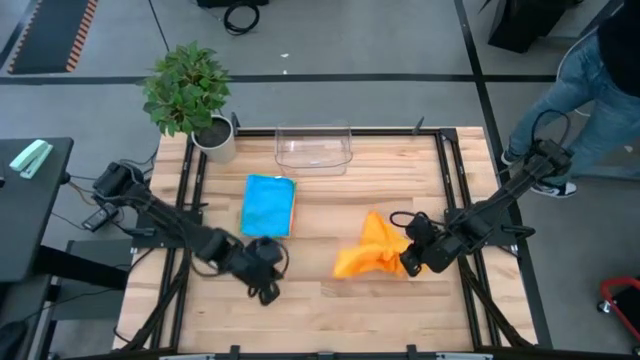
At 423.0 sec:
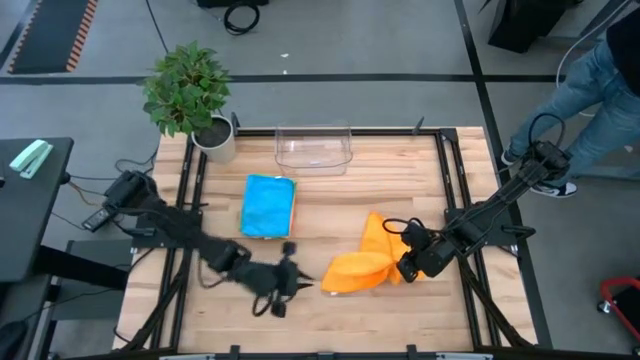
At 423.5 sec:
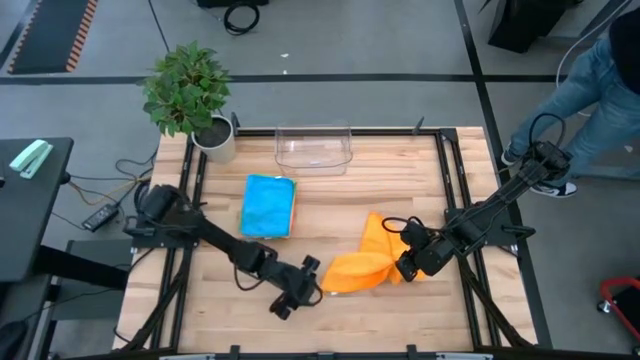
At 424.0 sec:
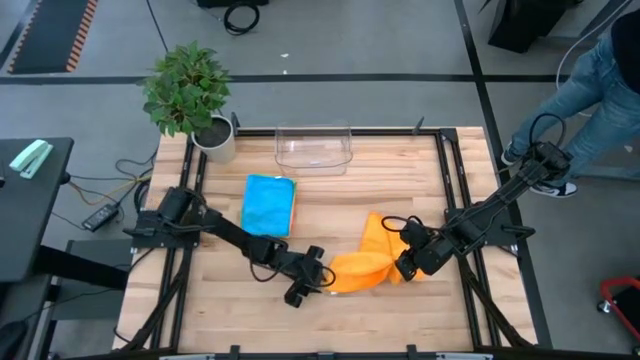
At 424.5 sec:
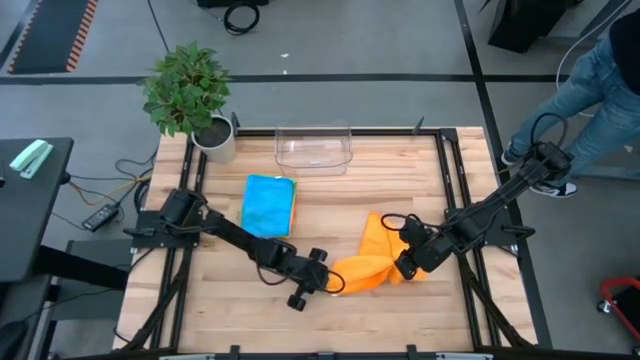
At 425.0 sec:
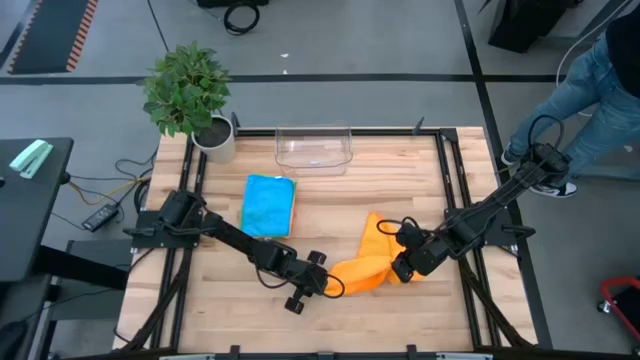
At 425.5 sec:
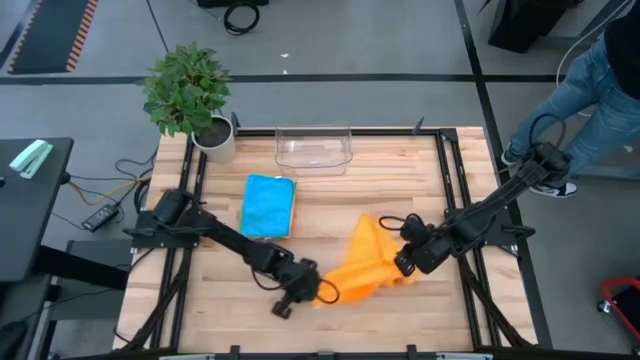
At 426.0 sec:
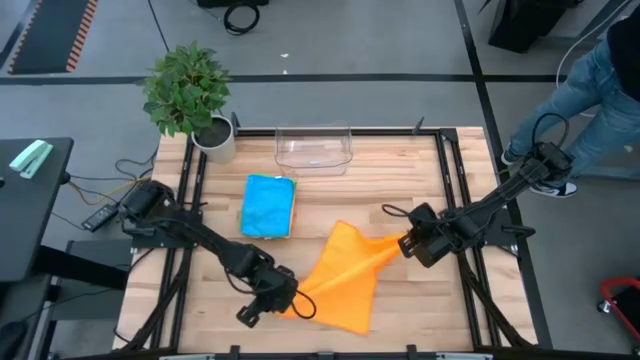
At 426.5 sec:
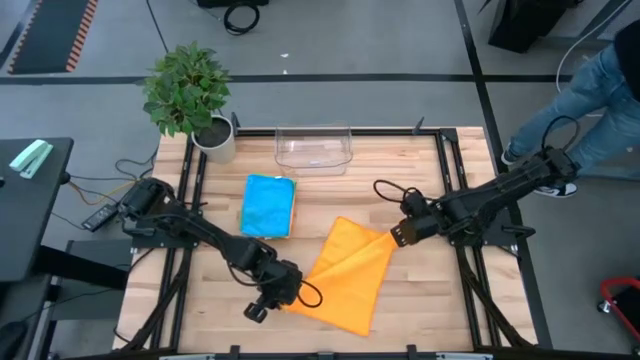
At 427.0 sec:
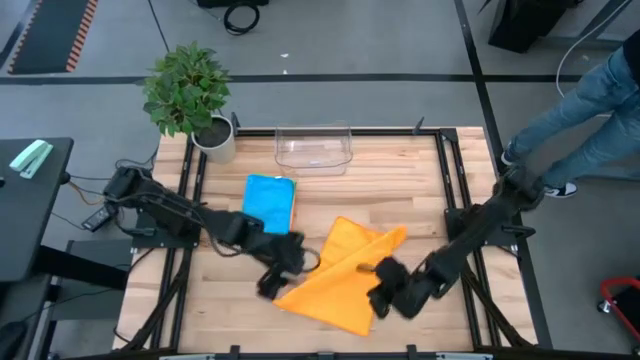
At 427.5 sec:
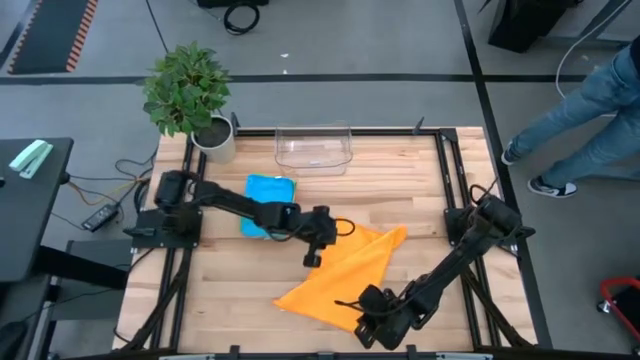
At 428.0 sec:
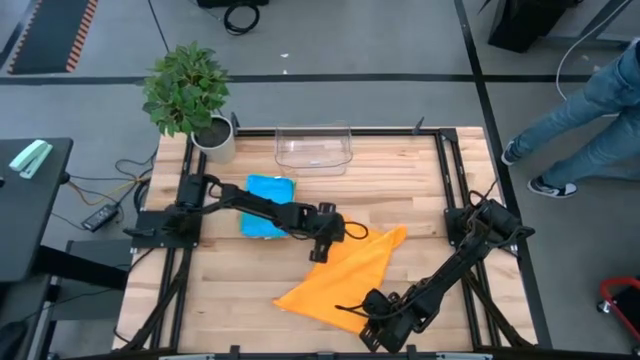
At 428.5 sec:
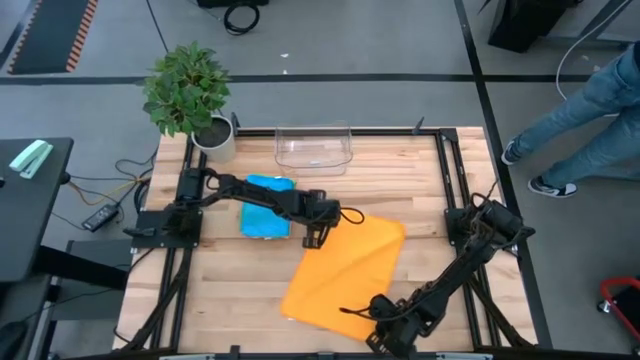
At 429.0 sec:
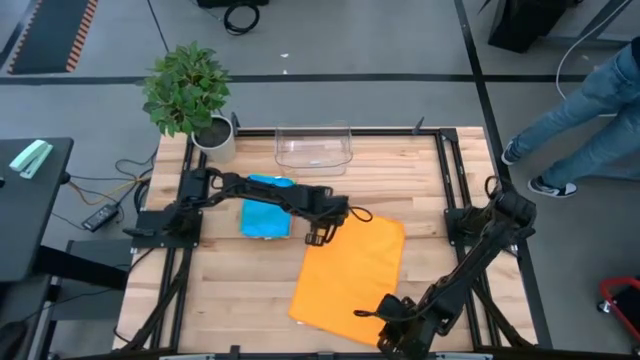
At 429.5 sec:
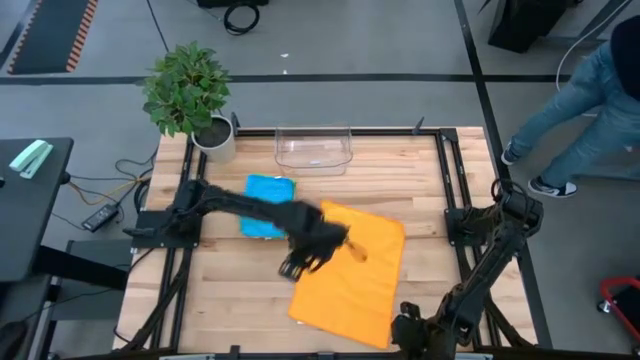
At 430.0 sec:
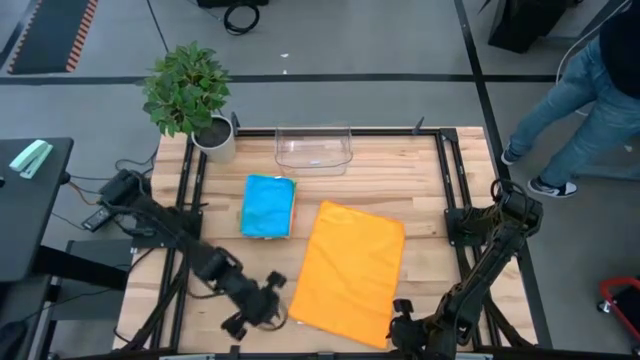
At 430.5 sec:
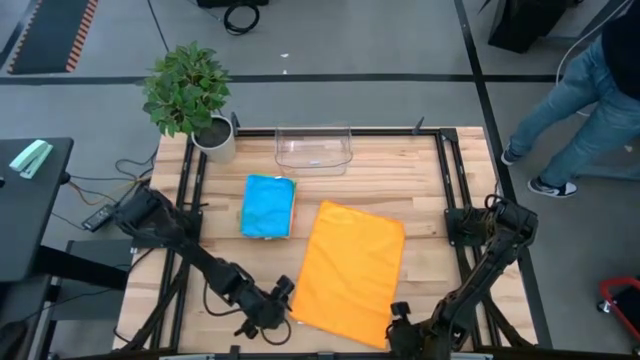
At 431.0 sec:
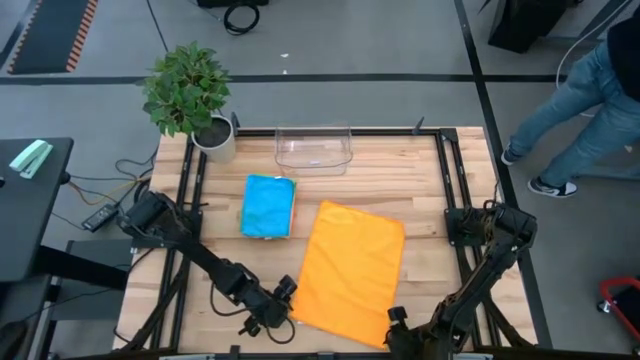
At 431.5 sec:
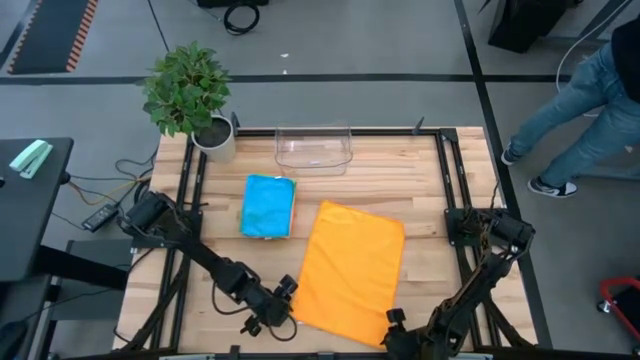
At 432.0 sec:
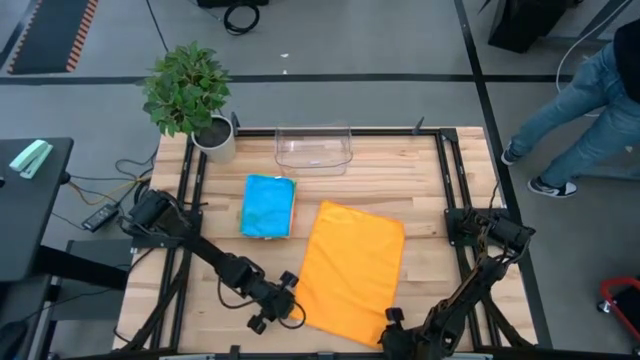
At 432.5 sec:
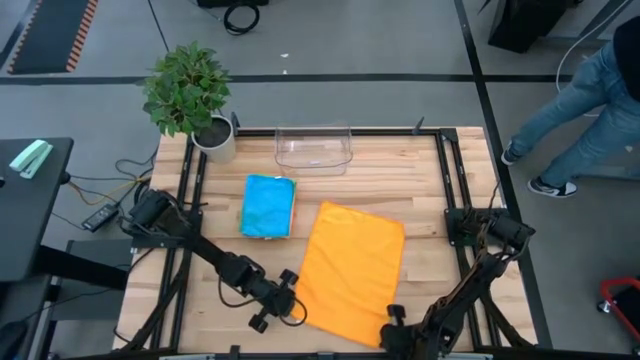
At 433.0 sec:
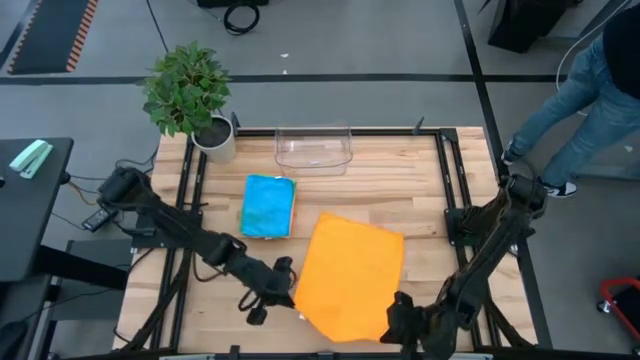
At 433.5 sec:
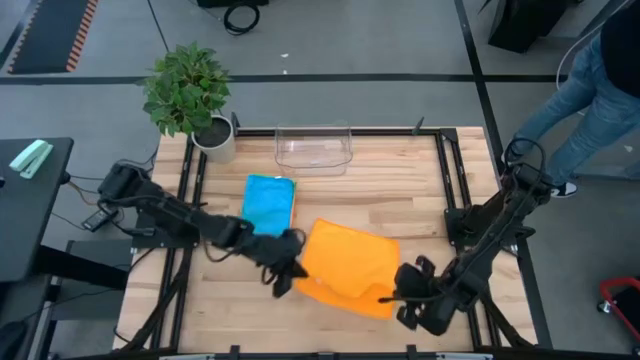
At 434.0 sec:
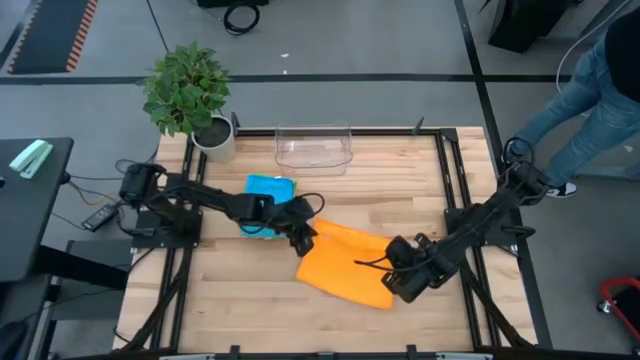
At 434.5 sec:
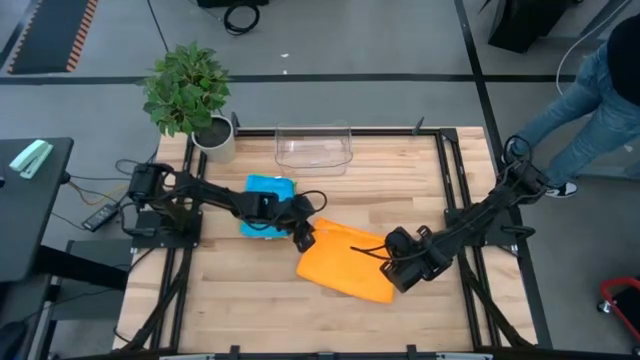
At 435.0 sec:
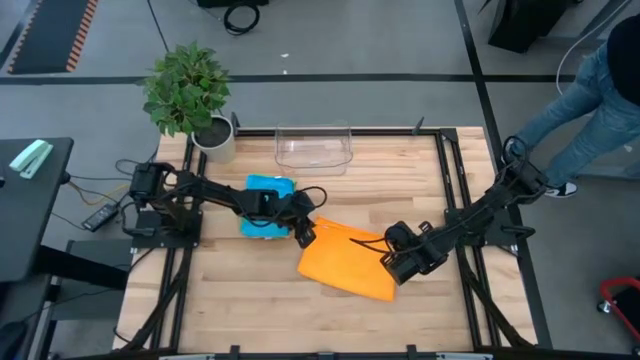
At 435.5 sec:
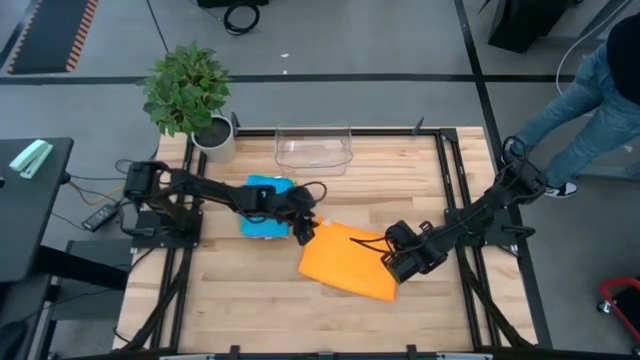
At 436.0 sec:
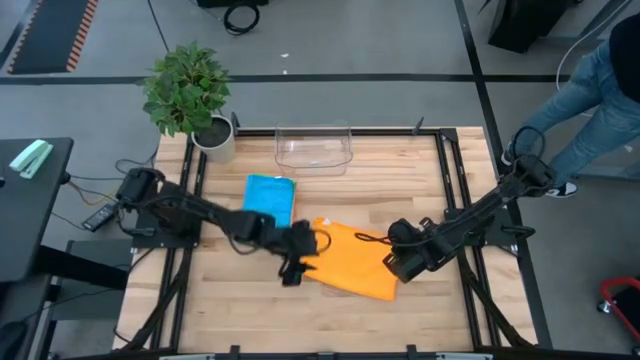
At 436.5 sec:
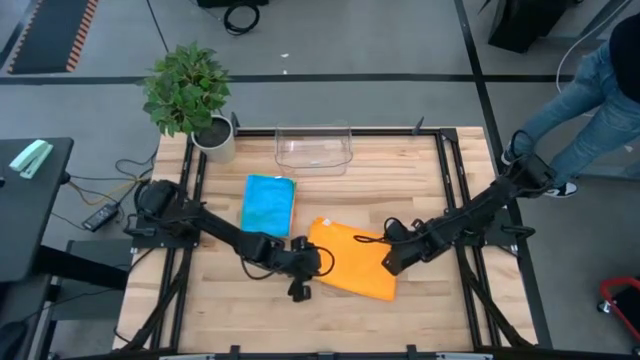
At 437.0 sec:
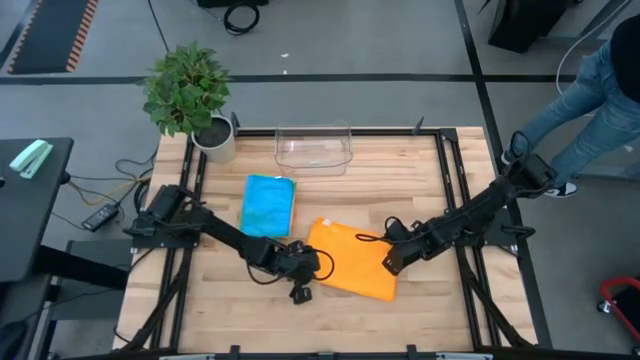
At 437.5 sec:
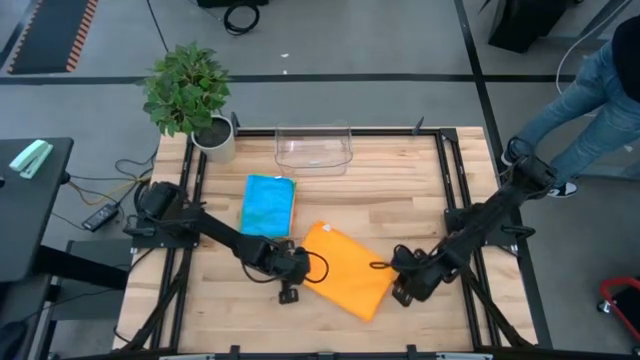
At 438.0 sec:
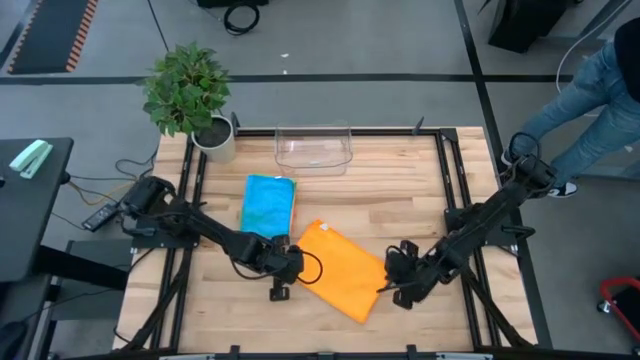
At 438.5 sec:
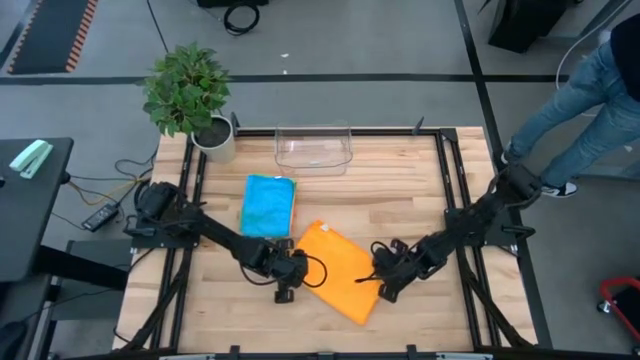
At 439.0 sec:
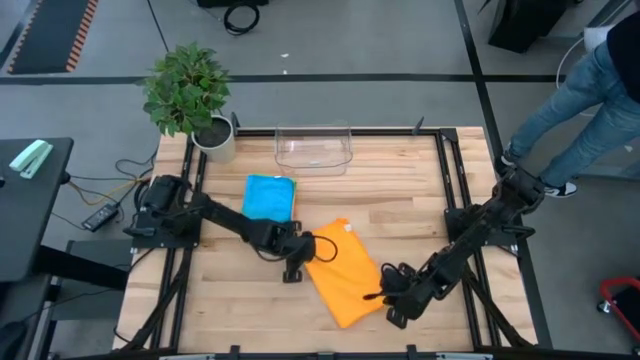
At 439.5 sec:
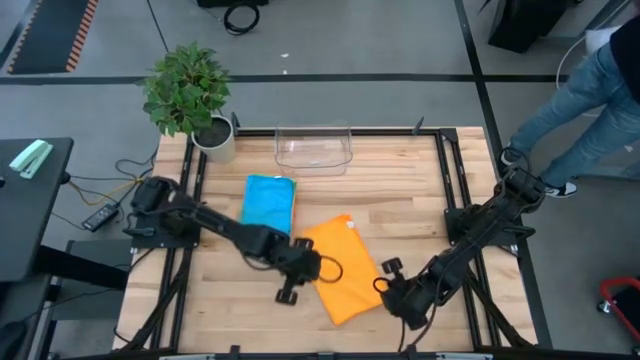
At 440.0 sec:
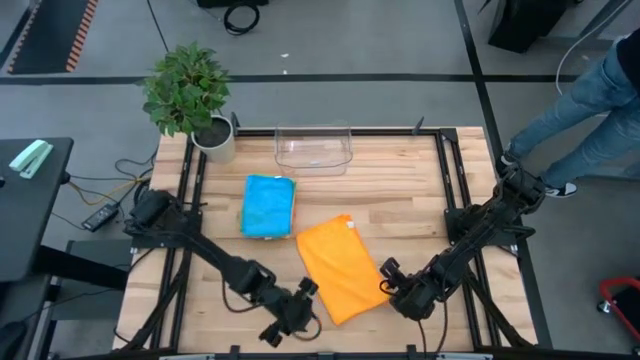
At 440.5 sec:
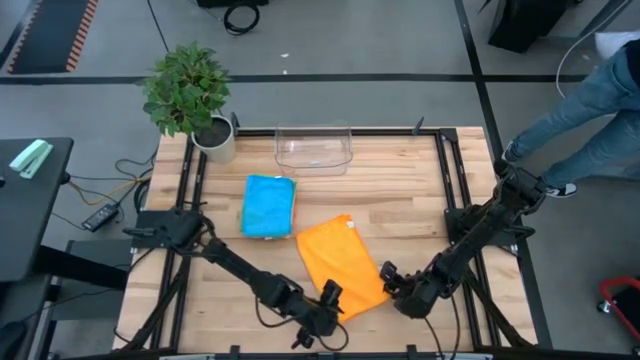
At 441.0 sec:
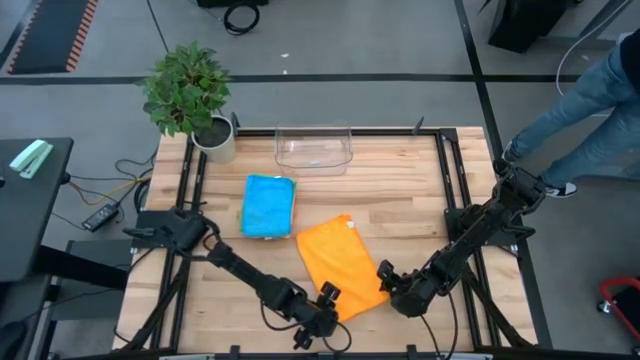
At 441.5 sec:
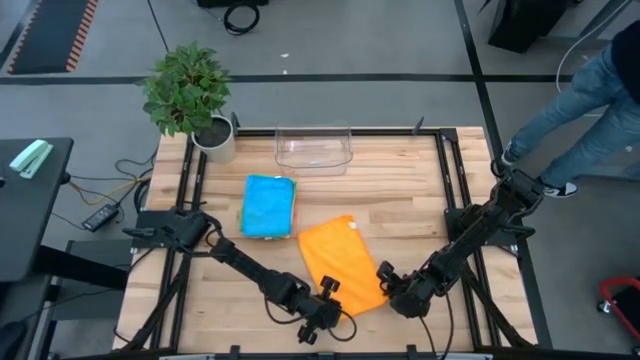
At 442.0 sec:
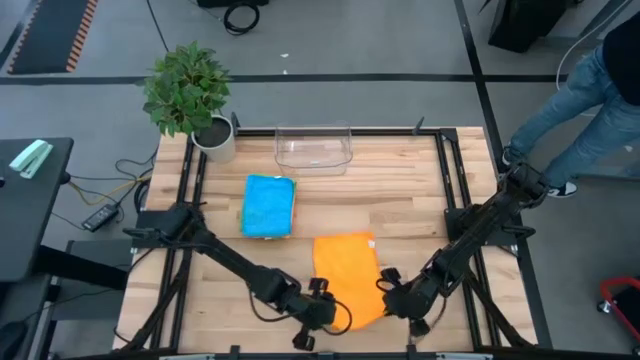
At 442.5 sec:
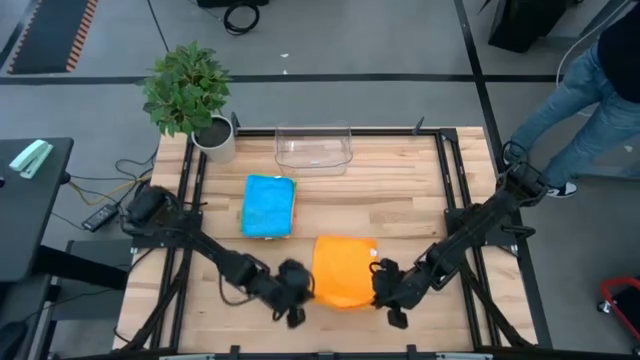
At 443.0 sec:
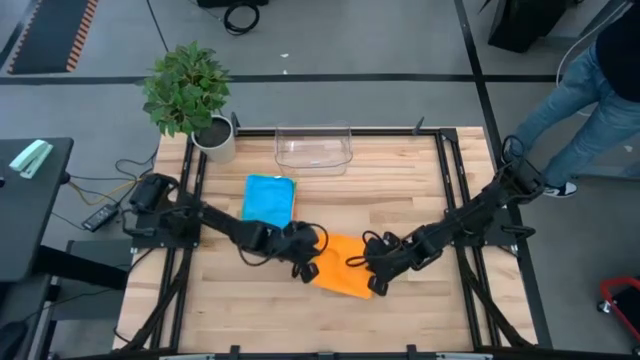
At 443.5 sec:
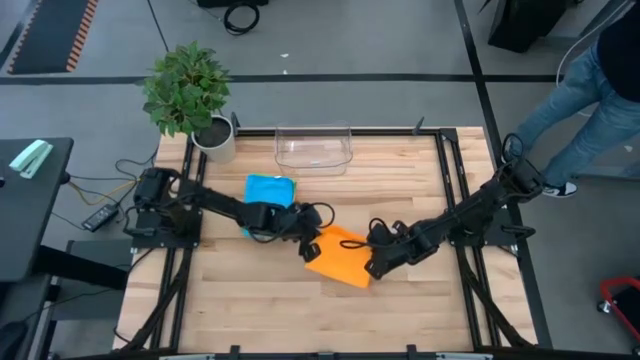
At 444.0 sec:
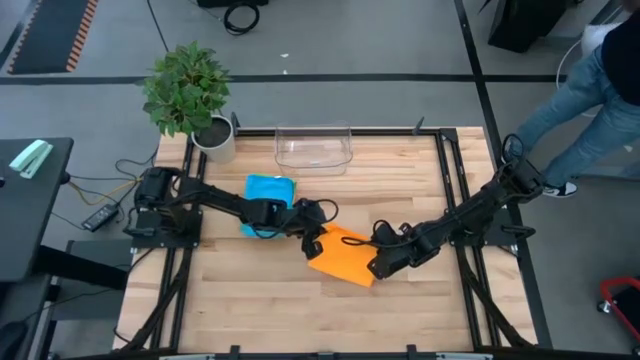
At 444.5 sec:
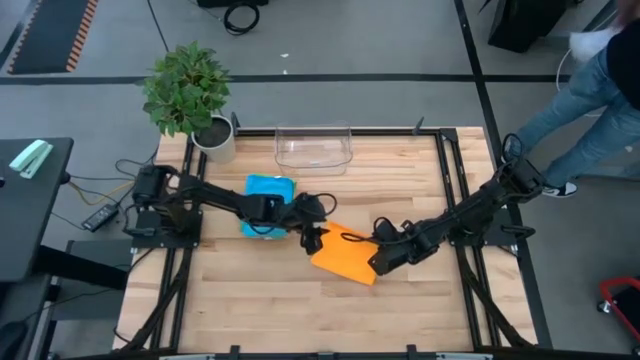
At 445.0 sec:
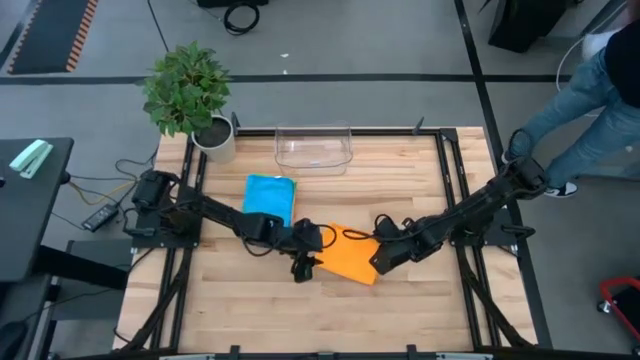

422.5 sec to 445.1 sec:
Task: Fold microfiber towels
Fold the orange microfiber cloth
